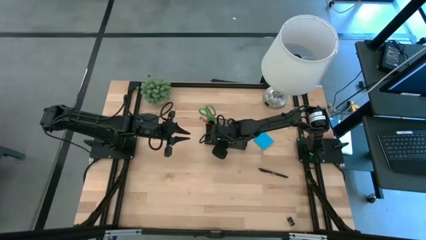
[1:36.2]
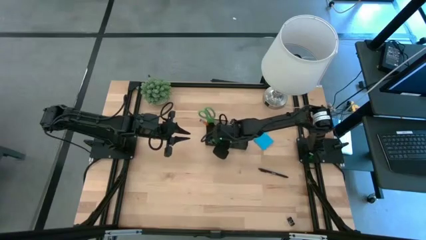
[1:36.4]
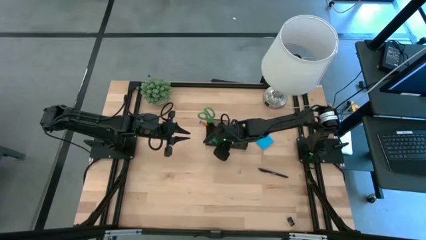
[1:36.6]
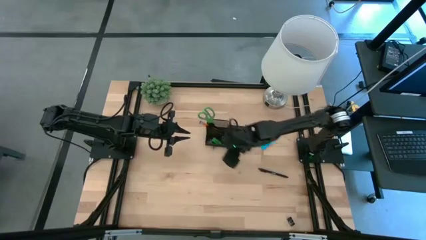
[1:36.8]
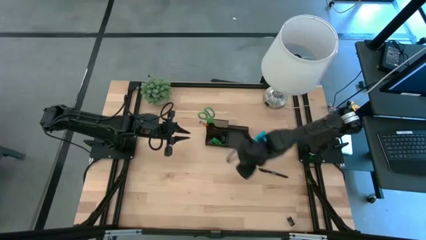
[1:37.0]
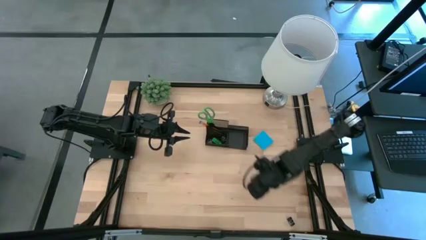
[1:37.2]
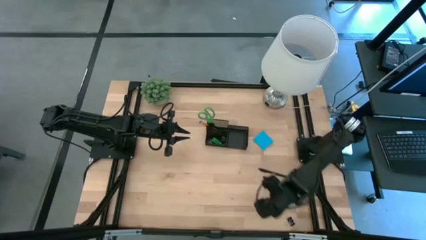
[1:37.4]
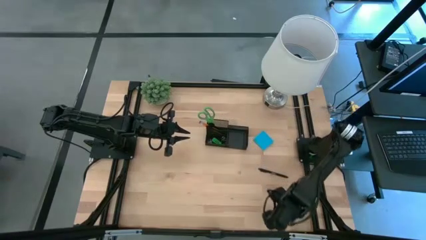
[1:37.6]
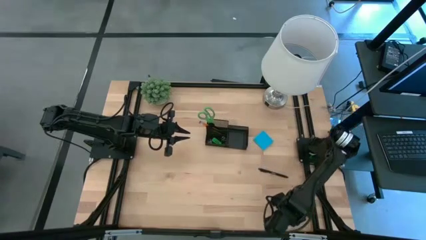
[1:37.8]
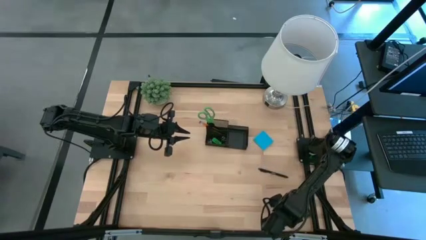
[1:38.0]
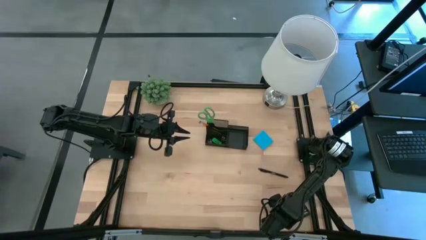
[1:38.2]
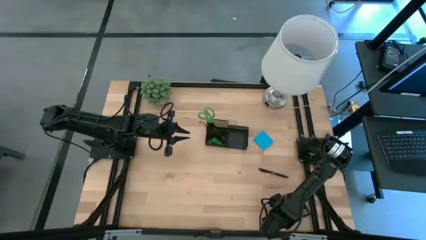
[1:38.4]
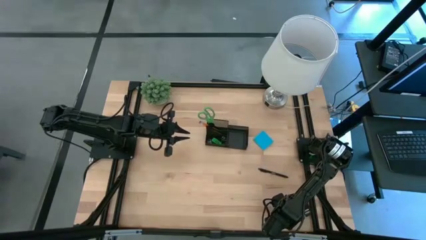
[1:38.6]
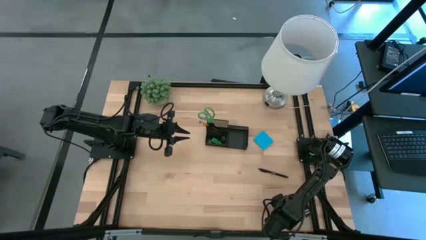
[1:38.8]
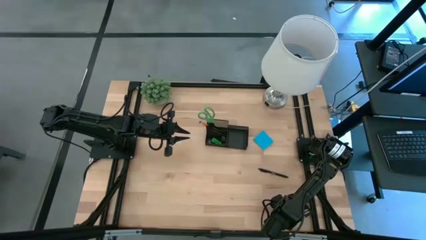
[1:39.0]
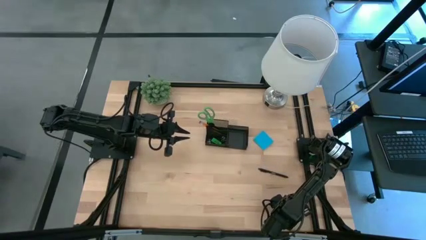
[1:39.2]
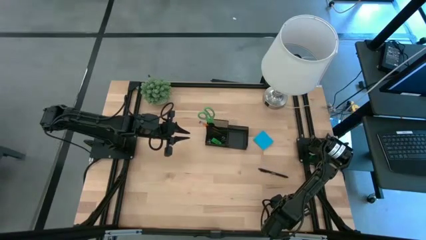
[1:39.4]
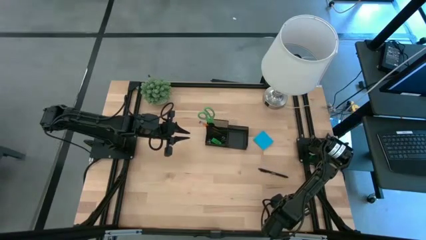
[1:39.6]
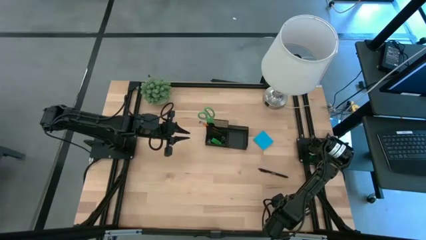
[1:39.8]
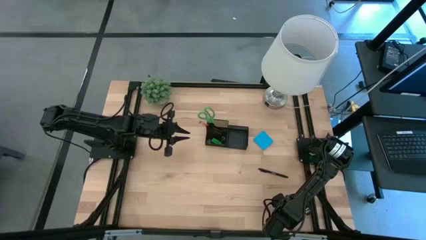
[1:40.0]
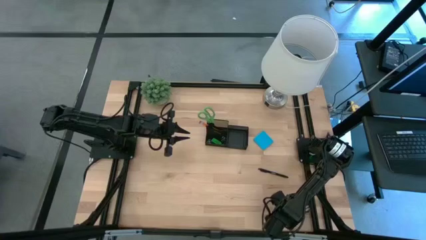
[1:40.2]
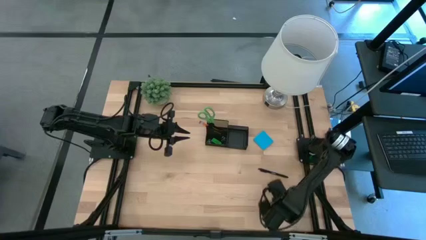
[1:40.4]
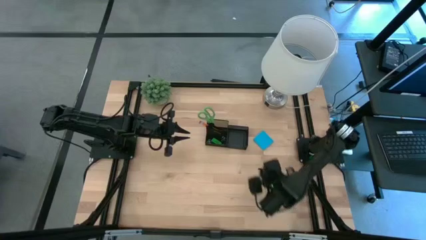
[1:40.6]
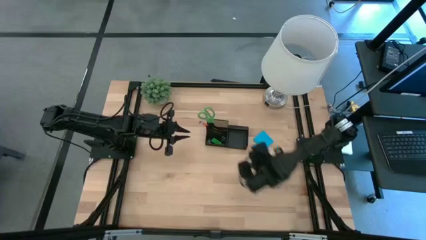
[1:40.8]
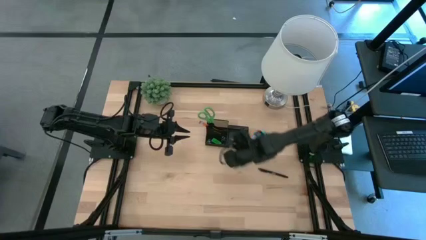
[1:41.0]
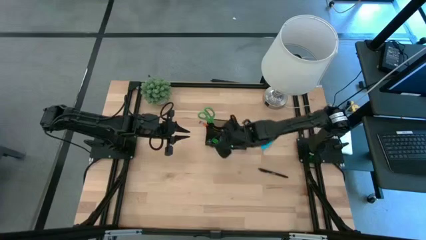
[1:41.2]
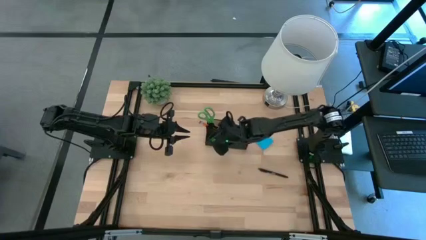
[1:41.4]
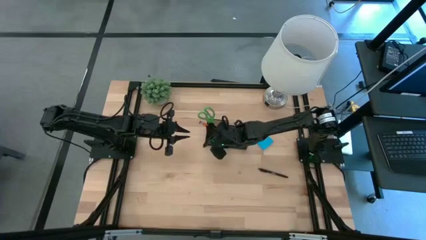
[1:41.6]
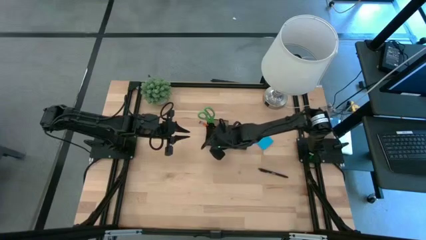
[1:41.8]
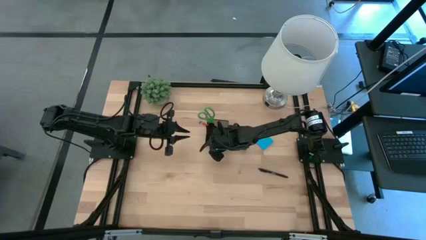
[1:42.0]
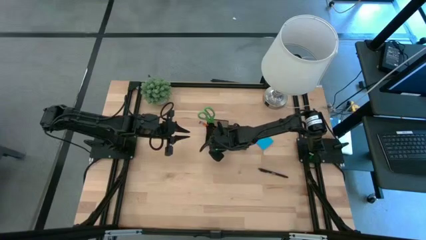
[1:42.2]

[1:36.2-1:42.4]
Task: Pick and place office supplies into organizer
Put the black binder clip into the black organizer

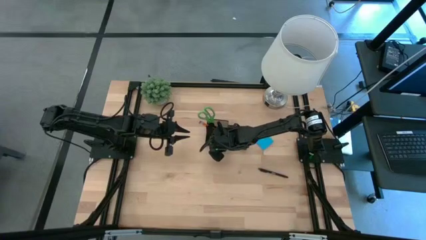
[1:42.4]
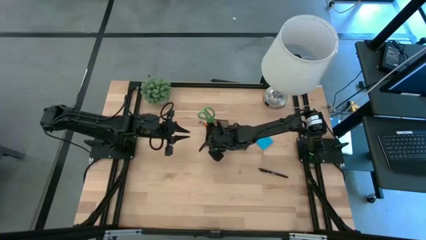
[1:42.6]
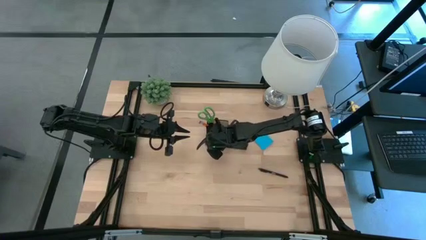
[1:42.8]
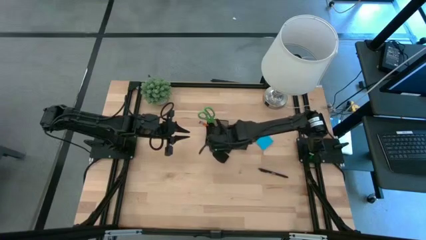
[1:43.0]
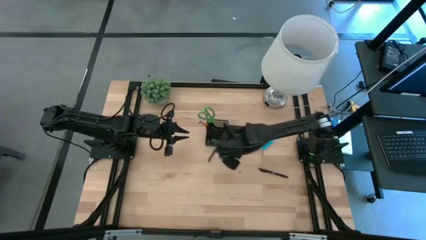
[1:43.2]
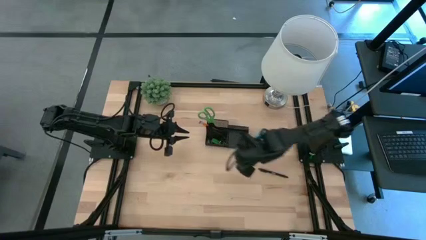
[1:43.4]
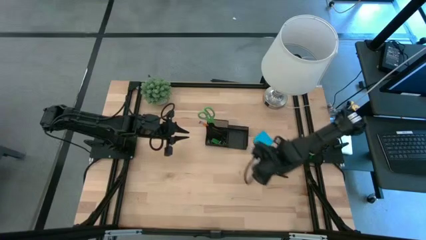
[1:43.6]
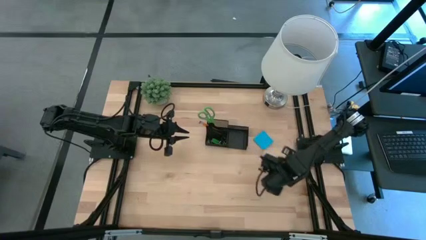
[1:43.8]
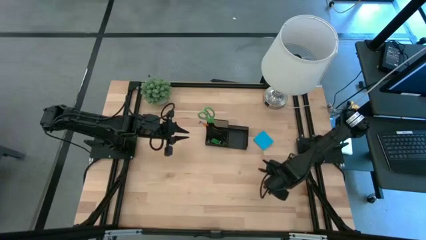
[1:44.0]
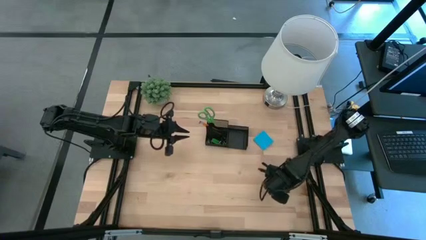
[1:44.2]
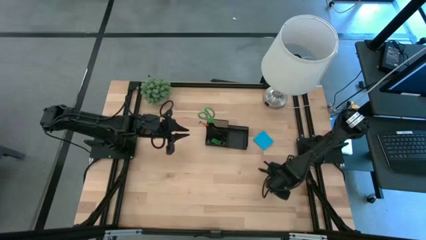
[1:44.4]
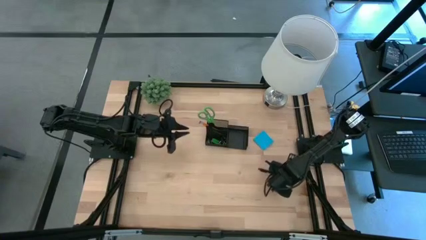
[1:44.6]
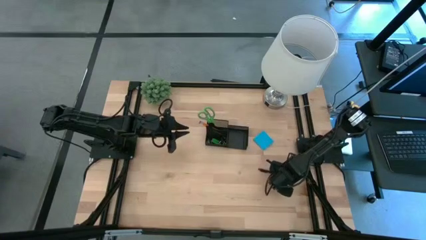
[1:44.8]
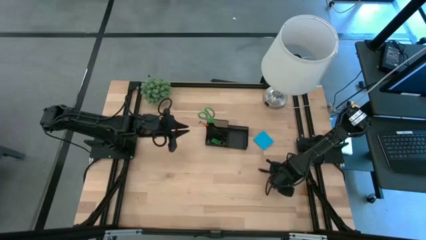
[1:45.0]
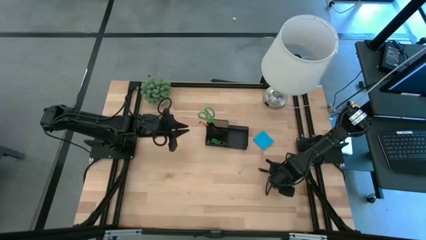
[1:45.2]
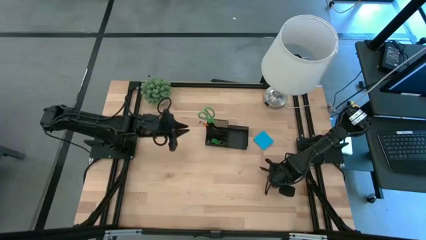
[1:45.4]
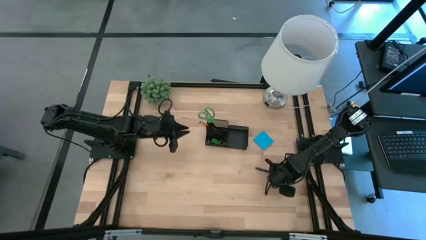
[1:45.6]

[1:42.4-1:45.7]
Put the black pen into the black organizer

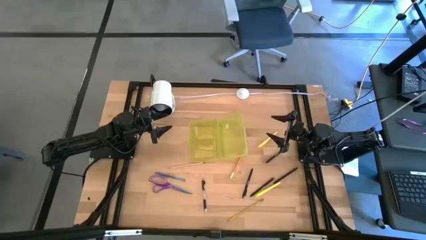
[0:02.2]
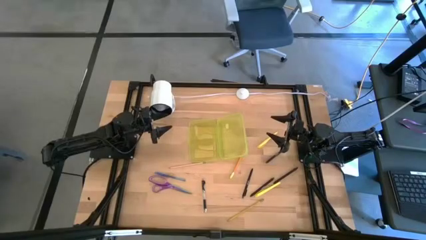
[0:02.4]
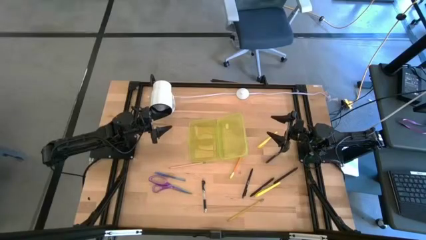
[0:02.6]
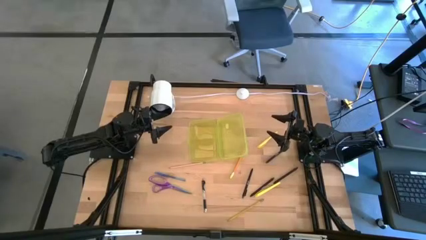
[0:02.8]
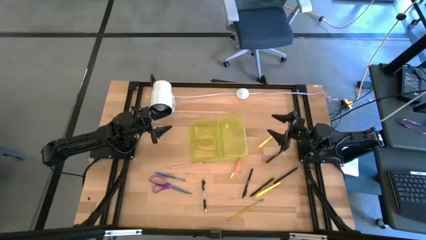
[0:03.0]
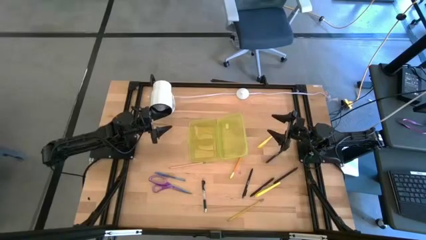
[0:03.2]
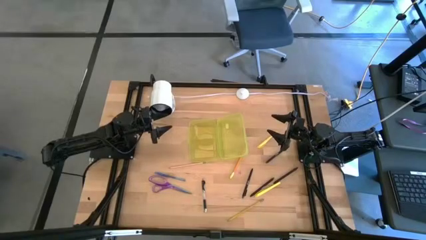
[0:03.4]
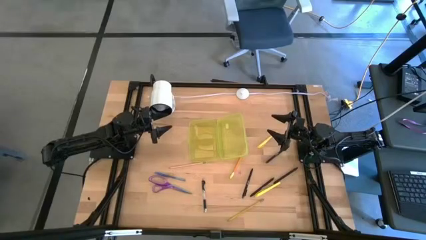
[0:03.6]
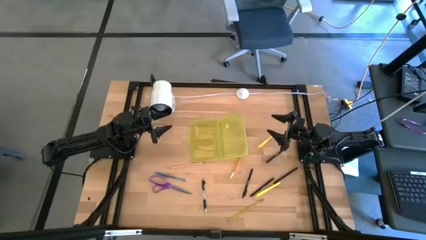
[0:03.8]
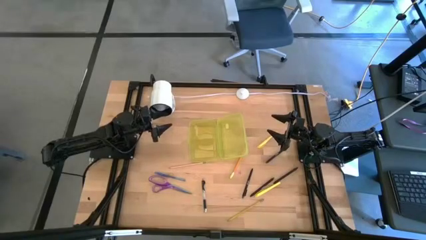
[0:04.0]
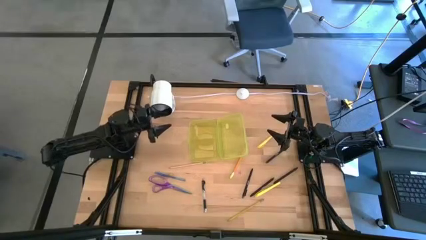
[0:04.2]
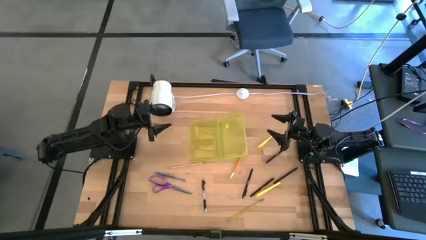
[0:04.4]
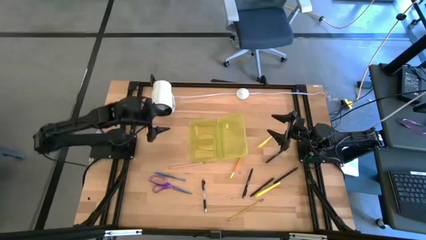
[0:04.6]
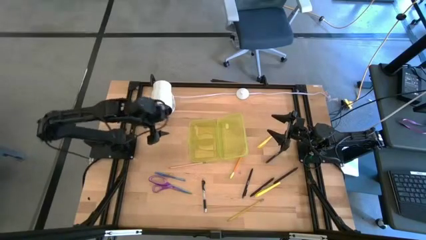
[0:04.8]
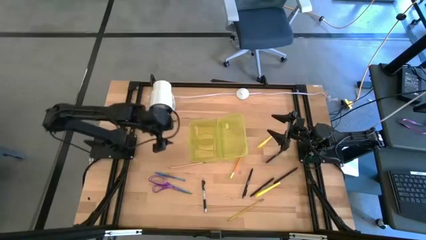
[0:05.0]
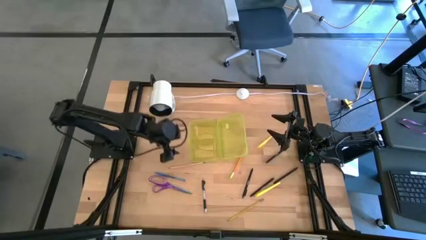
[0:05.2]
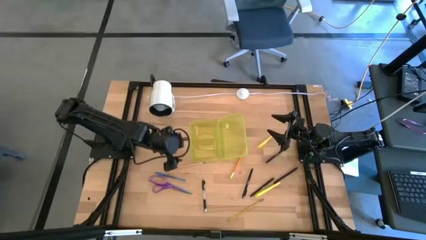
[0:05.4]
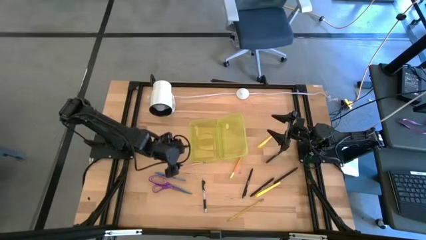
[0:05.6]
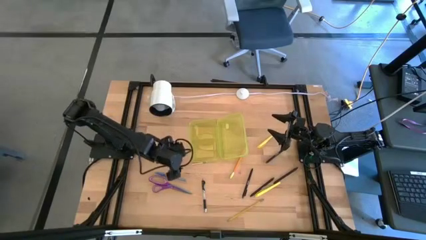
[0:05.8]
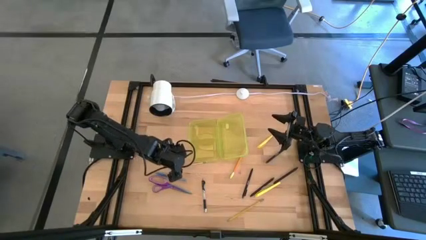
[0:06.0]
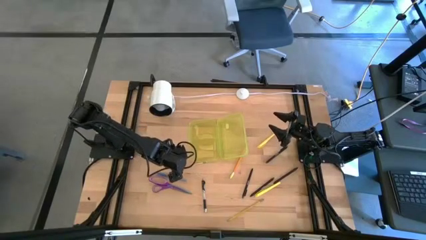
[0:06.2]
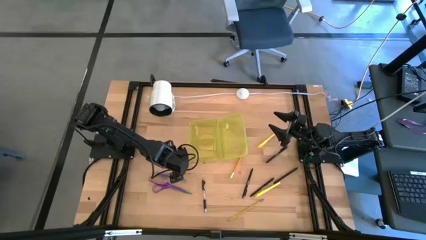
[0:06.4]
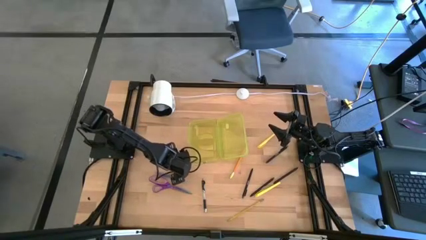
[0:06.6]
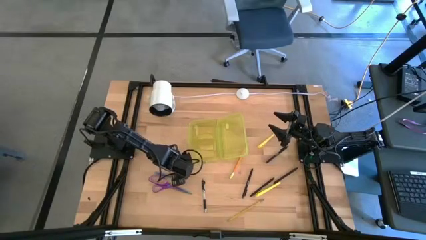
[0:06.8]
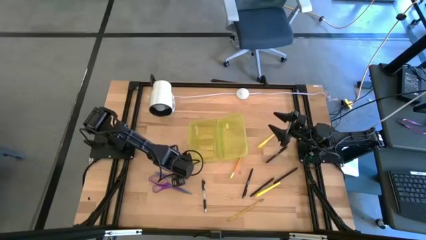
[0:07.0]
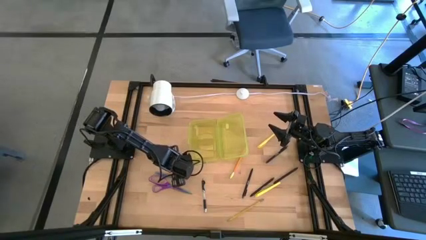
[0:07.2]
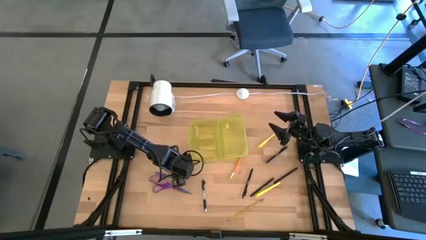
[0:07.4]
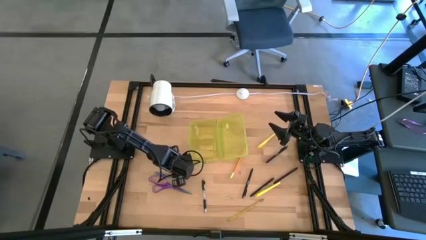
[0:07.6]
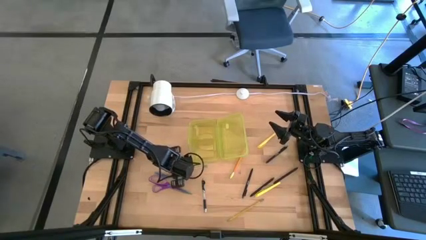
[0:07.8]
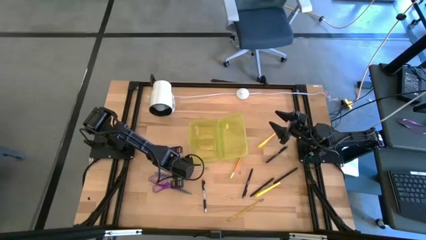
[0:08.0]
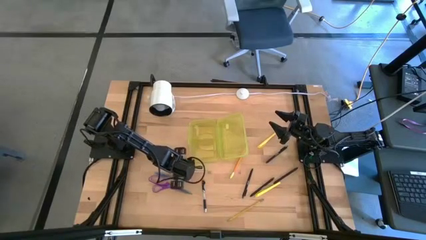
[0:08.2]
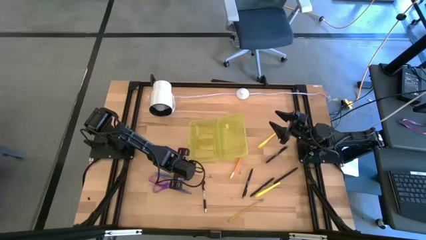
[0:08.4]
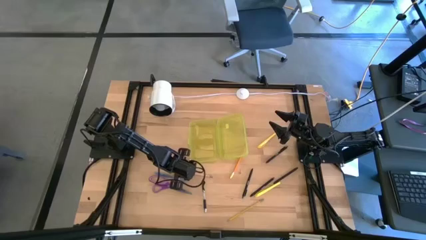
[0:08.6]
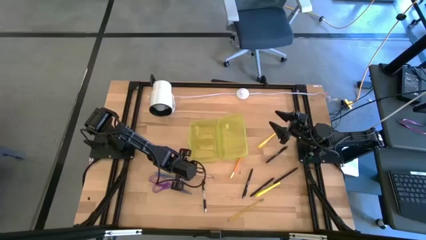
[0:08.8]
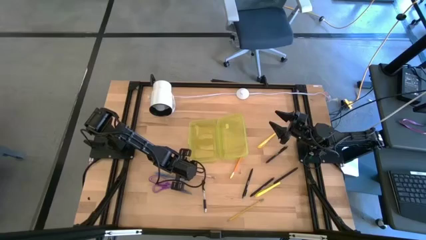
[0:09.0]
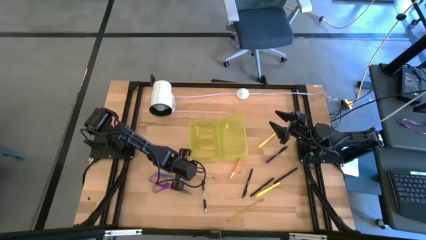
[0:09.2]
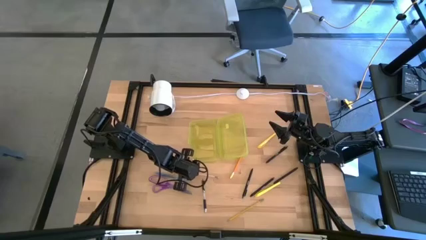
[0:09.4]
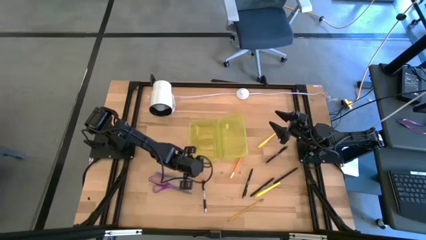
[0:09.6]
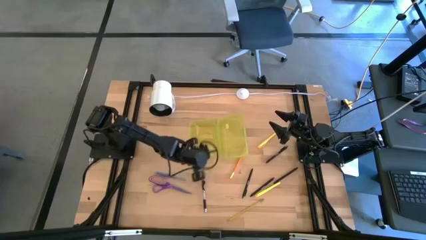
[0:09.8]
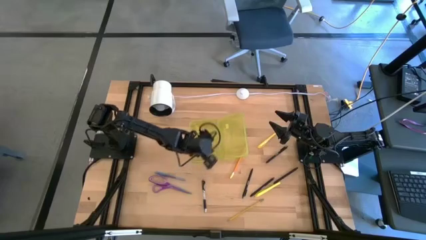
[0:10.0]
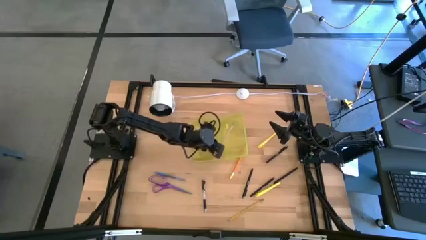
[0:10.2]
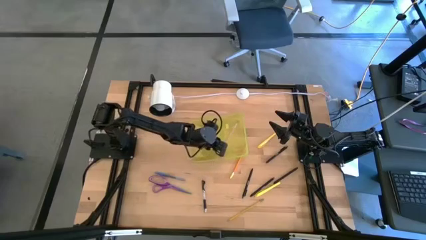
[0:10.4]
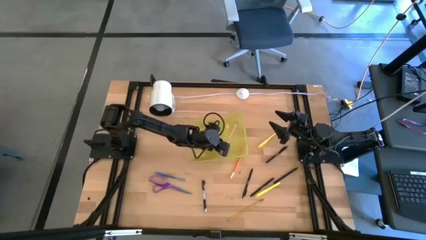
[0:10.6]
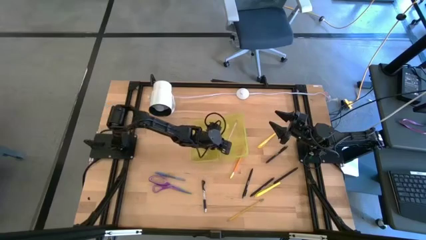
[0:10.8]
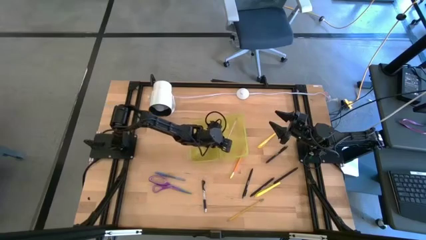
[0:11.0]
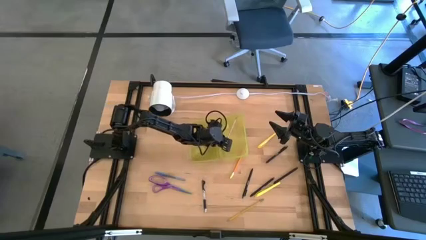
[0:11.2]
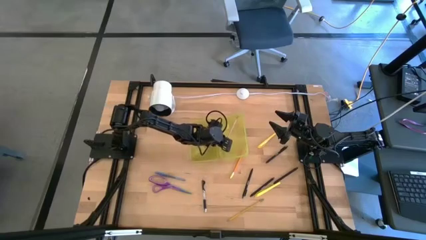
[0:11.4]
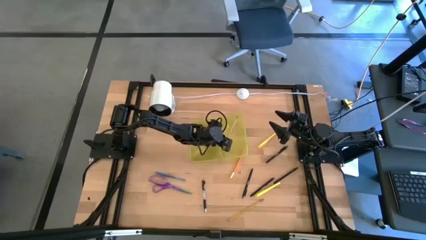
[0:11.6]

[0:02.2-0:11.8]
Task: Pick & place school supplies into a supply box
Put the pink pencil into the yellow supply box
